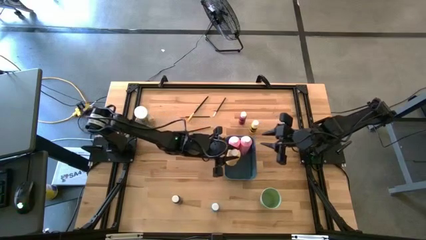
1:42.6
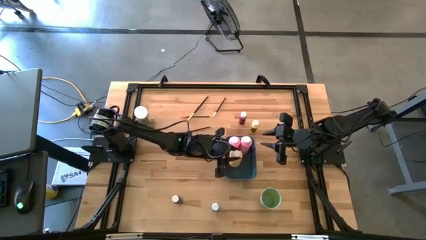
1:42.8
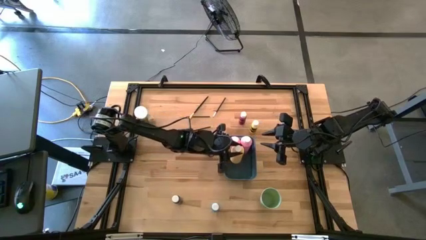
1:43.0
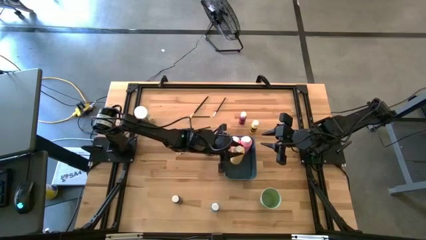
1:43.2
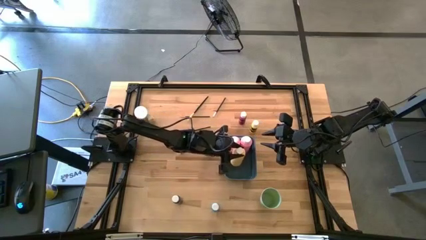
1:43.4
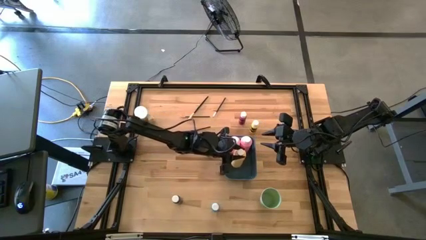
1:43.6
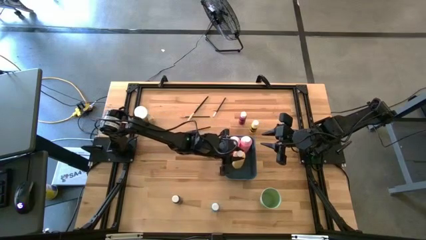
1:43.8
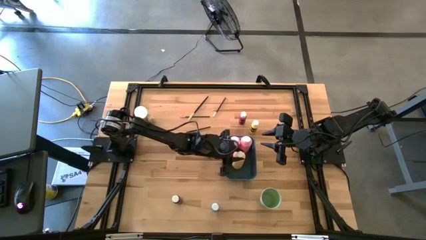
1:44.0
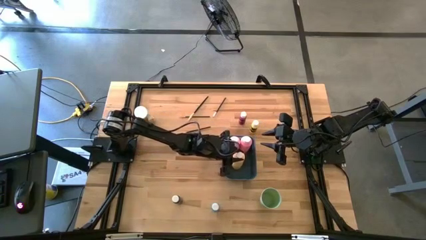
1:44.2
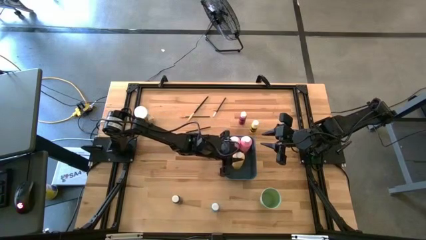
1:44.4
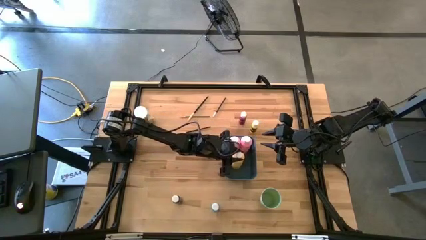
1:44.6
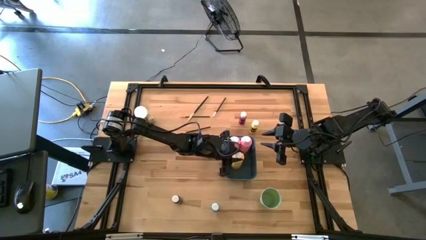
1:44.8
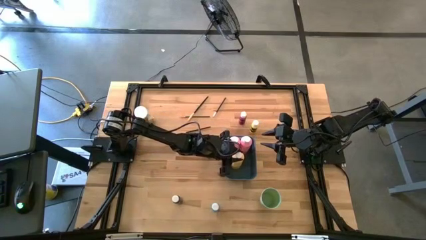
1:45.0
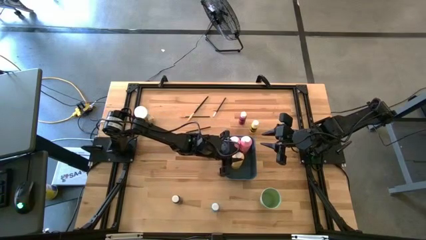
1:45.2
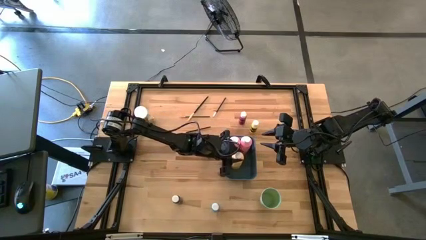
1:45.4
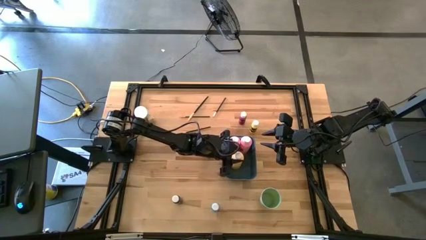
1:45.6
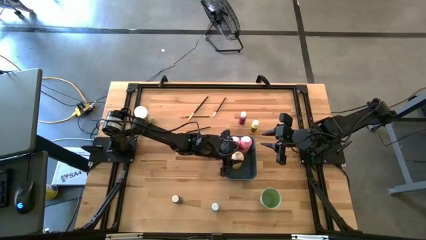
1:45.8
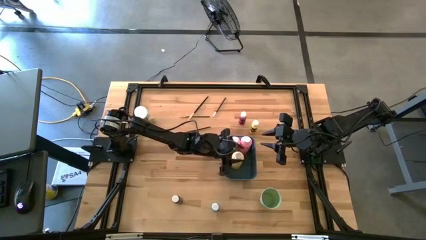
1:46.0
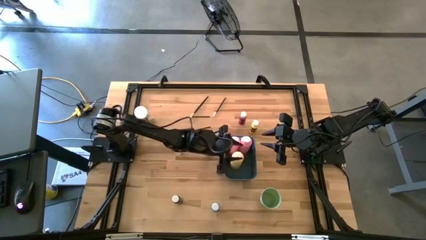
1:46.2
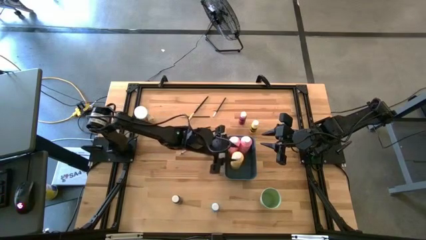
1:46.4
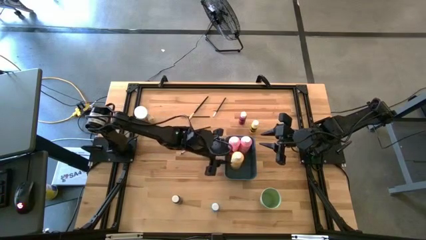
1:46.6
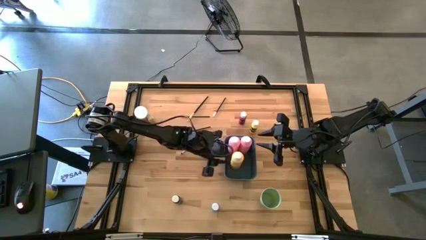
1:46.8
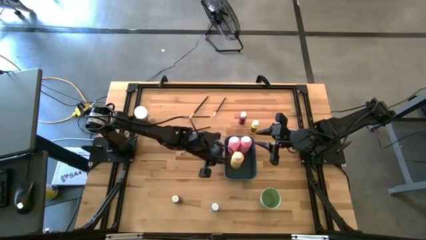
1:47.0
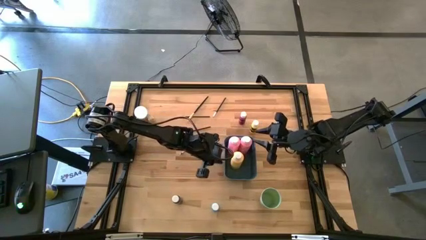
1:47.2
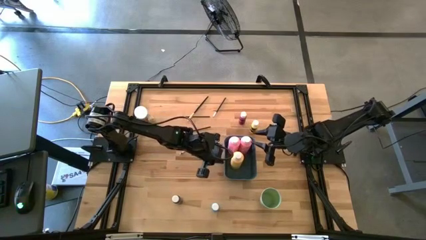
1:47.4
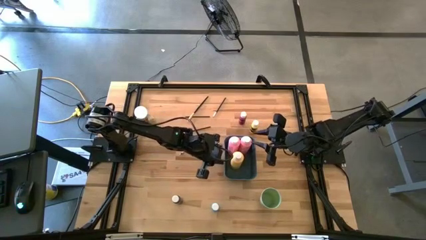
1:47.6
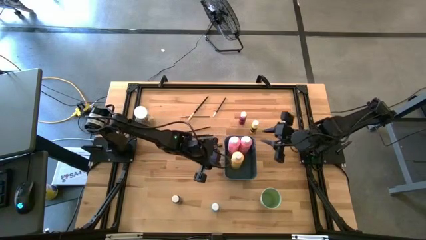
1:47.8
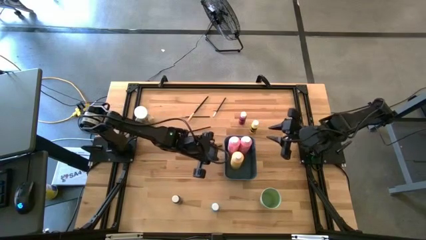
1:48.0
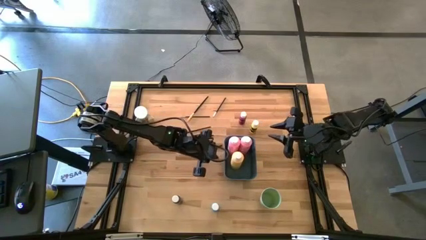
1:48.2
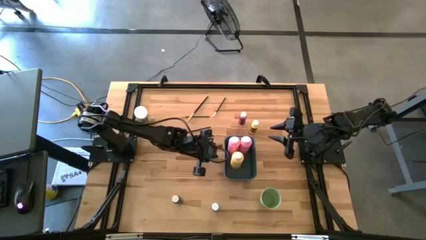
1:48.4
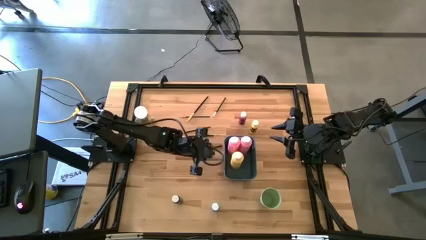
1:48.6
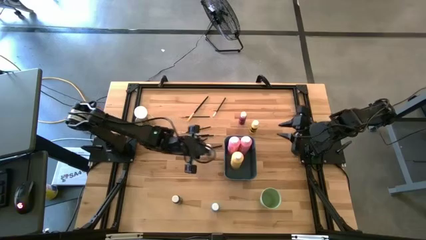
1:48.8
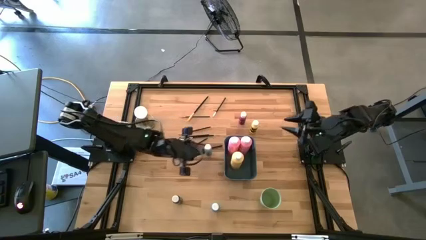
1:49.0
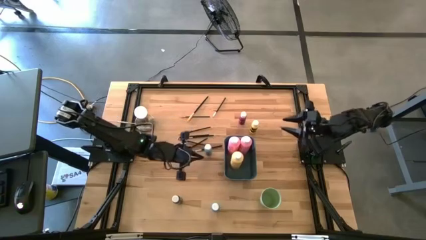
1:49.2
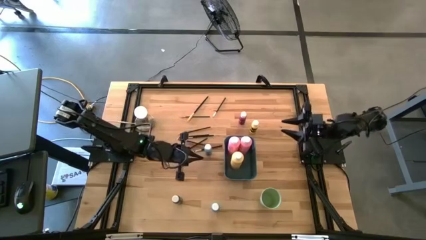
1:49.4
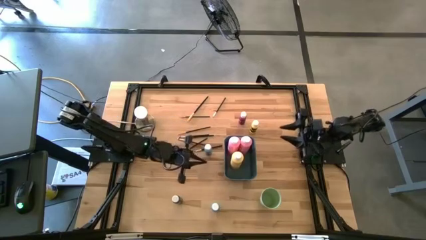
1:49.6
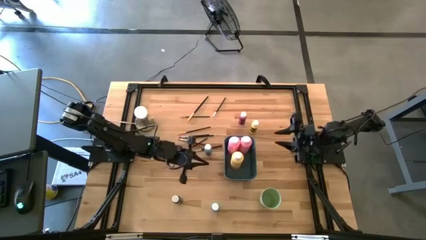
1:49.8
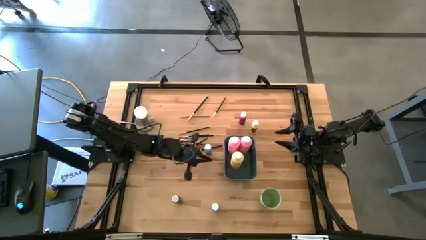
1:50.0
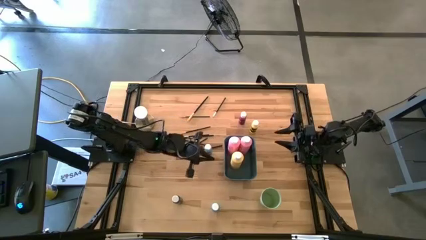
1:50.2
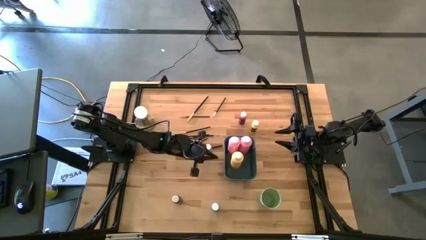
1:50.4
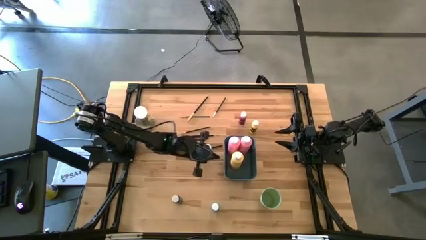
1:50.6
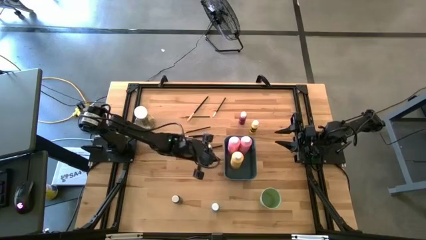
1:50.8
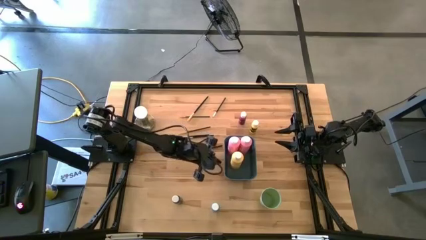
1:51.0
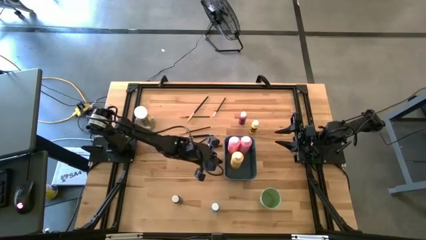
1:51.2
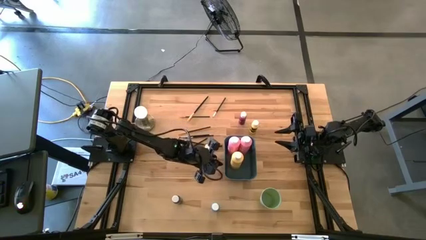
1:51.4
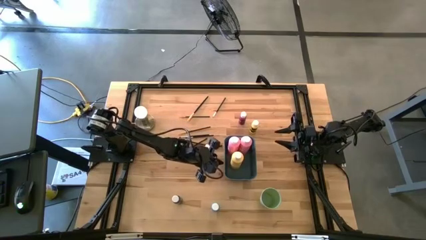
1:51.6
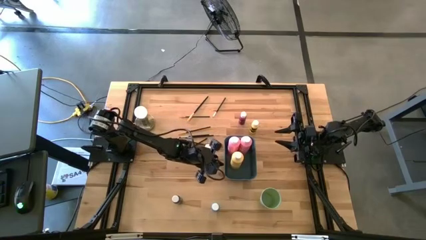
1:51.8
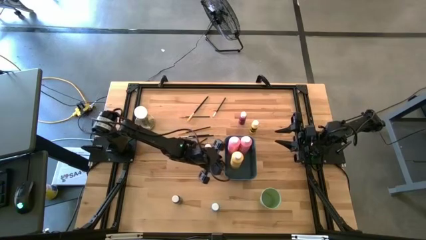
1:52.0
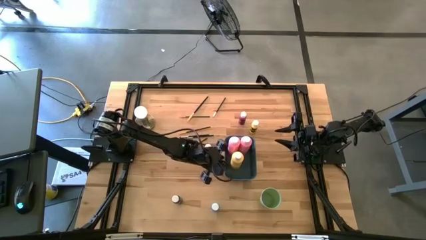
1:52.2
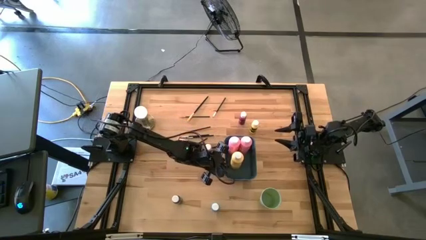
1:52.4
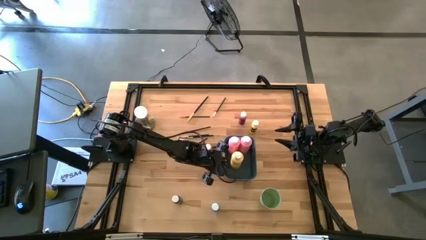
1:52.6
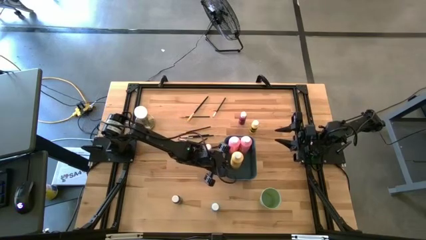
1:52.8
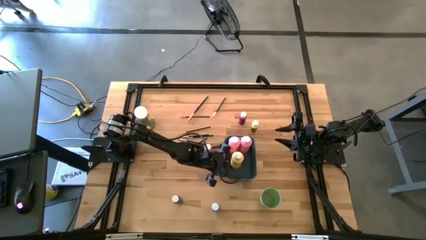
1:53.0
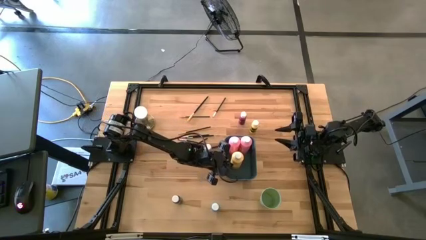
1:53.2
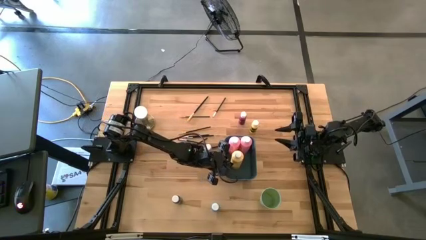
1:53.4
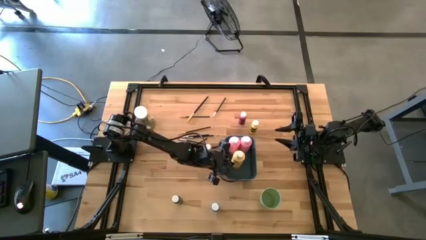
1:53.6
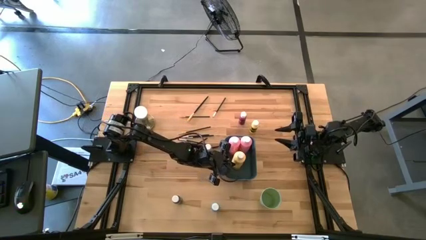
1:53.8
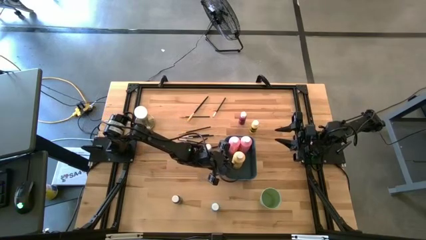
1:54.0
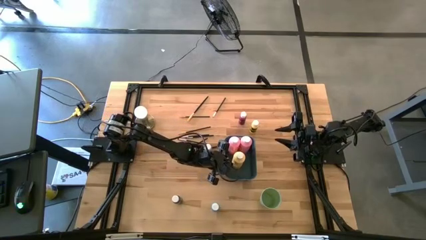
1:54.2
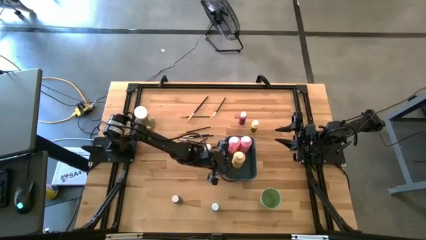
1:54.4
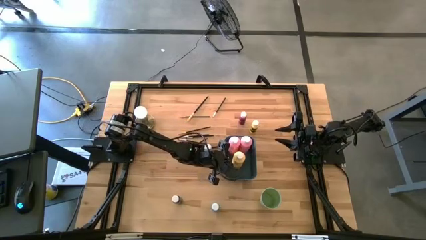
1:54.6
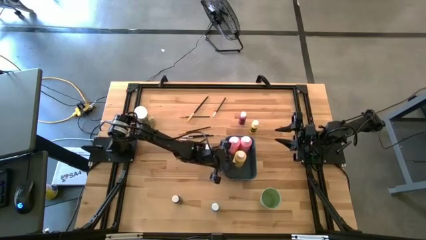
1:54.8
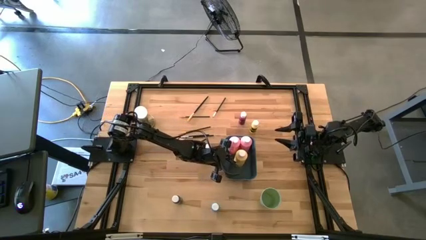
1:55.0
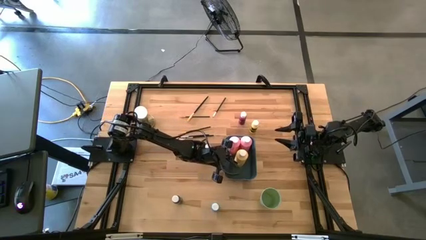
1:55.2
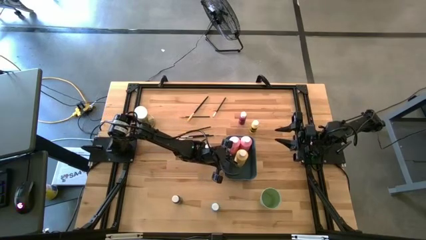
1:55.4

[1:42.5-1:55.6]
Task: Pick & Place Paint Supplies
Put the large yellow paint bottle into the blue bin

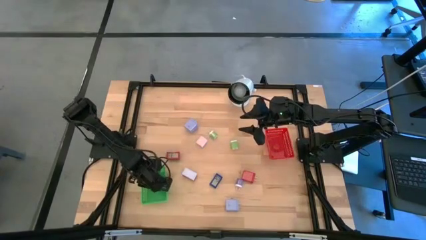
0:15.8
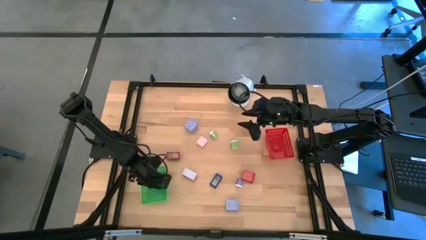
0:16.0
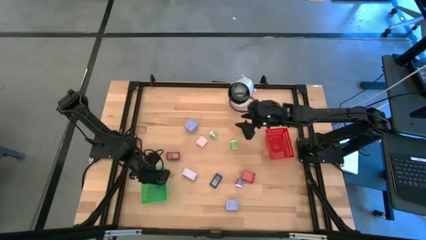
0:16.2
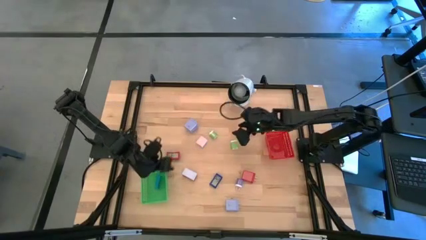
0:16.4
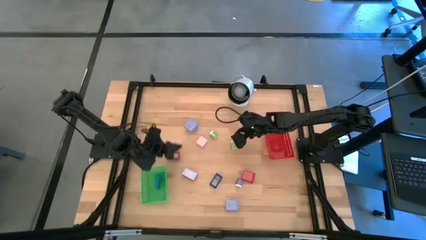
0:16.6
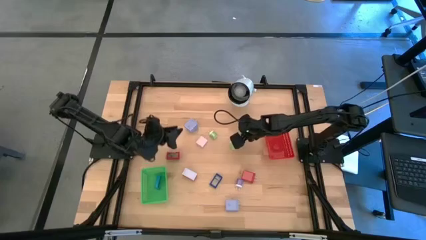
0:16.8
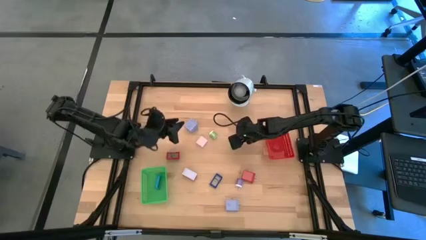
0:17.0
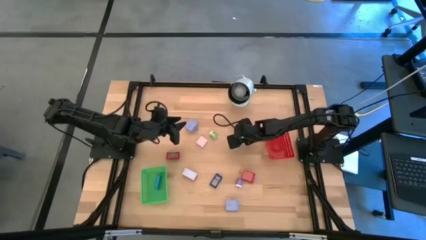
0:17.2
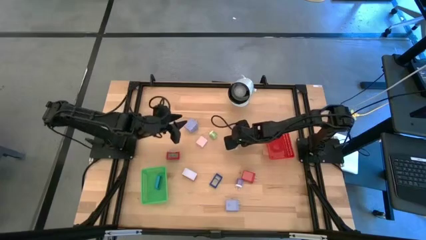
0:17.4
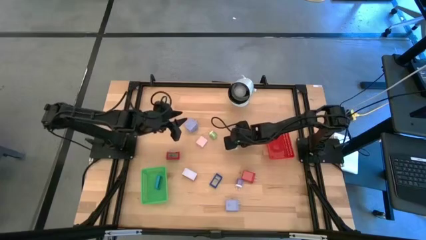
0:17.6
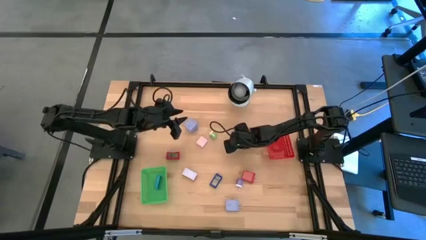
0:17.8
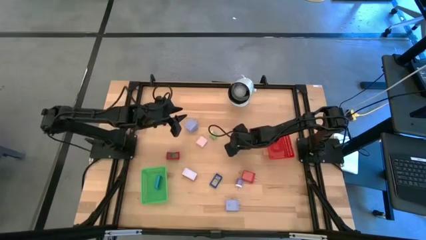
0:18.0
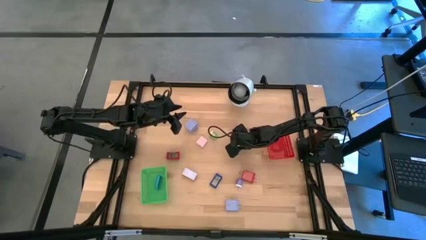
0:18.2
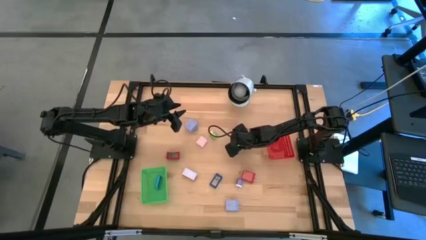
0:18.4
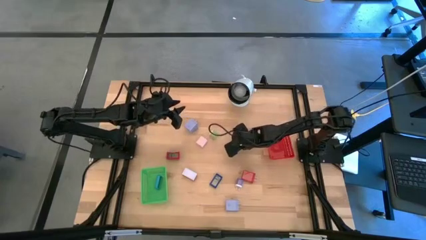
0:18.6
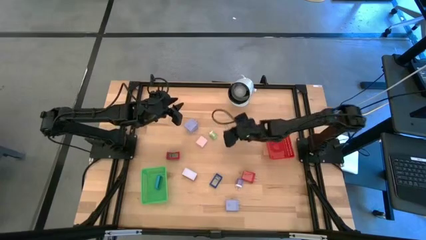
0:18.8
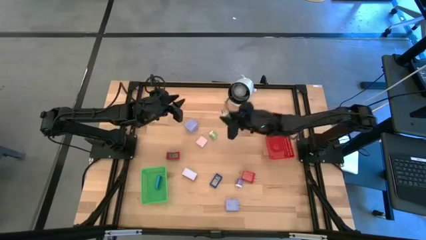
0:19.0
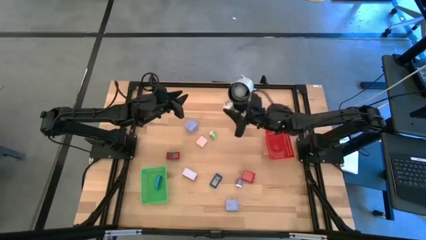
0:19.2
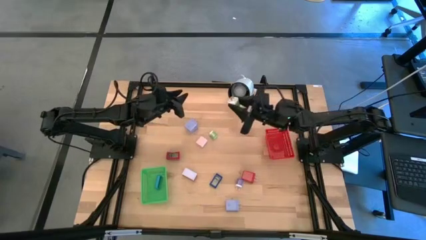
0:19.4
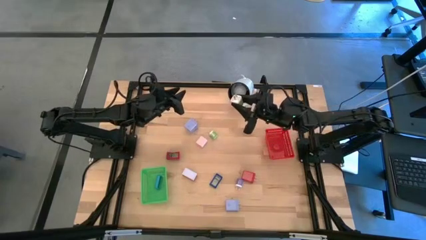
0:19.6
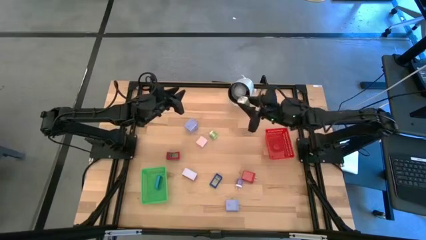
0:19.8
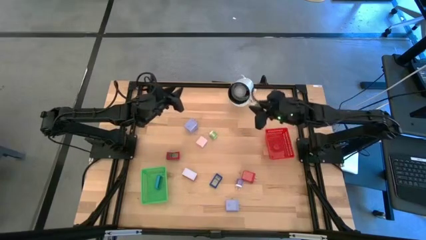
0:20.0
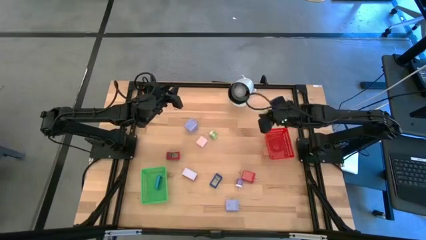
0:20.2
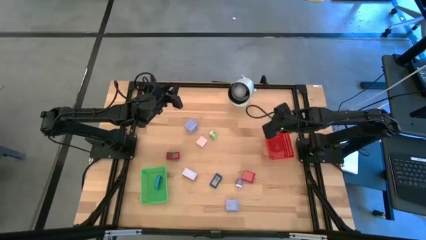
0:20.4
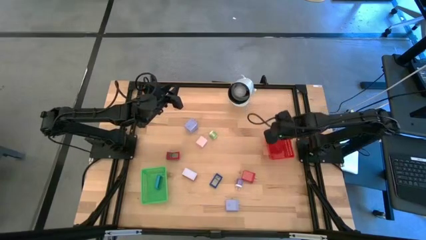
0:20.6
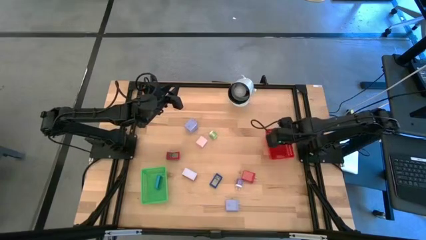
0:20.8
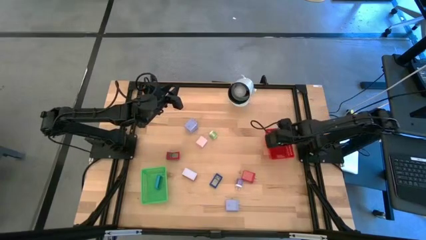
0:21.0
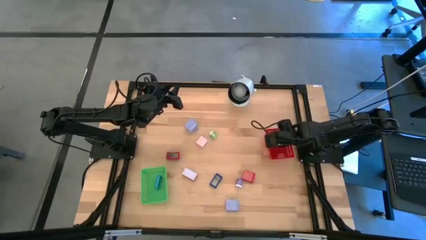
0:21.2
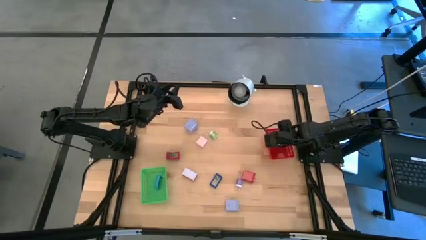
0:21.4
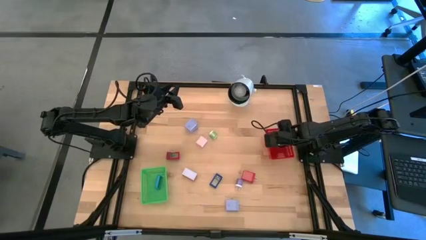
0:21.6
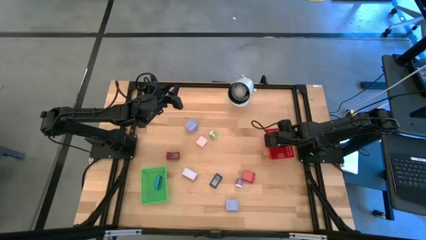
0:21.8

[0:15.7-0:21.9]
Task: Pick & Place Office items
Put the right green charger adapter into the red bin
